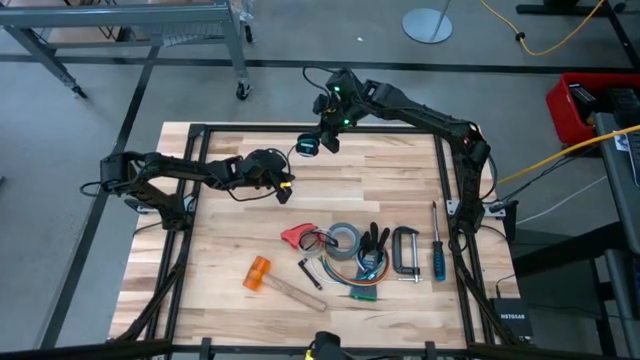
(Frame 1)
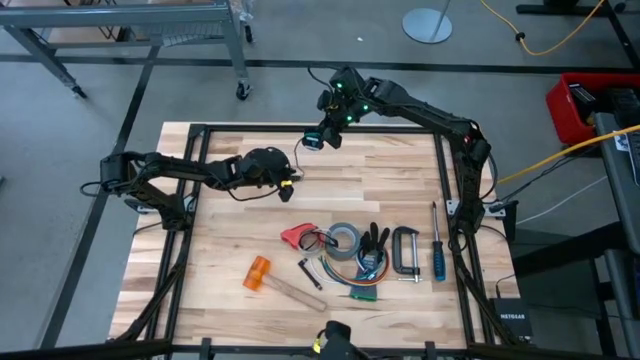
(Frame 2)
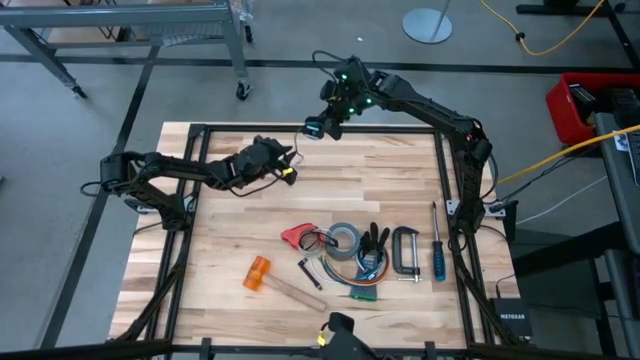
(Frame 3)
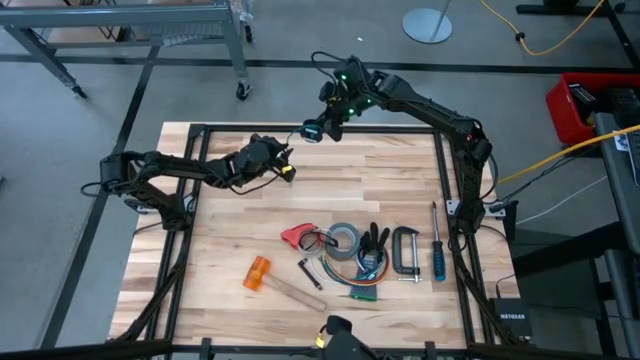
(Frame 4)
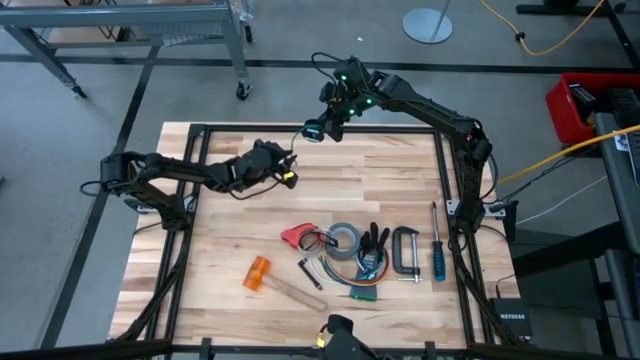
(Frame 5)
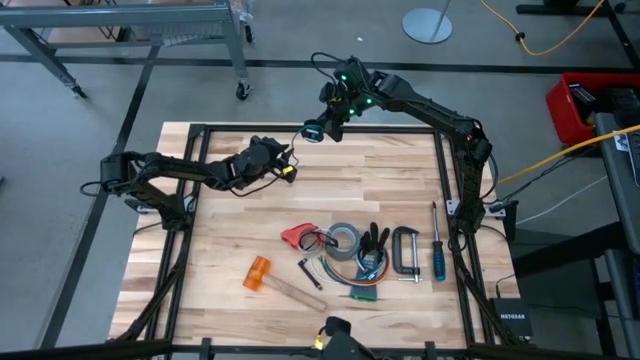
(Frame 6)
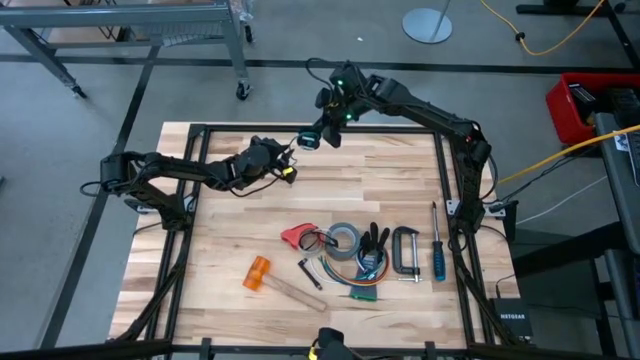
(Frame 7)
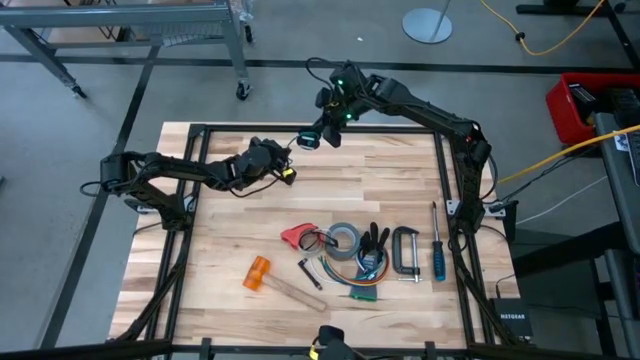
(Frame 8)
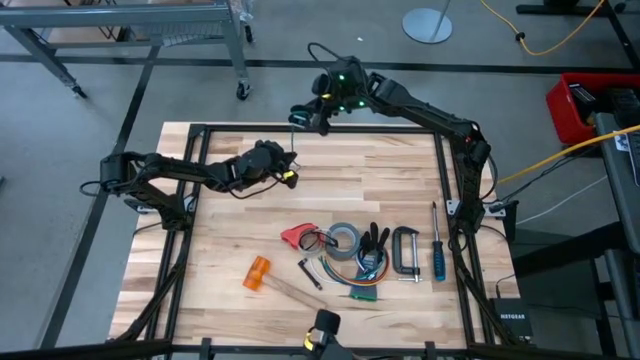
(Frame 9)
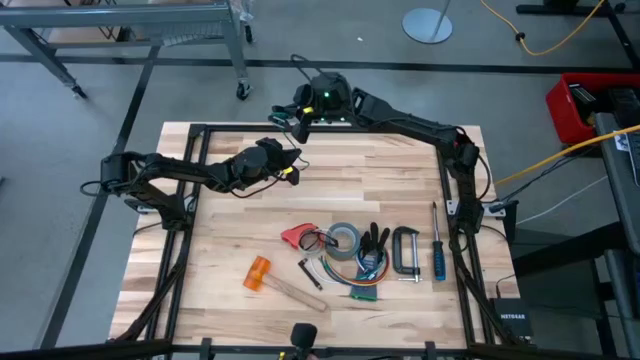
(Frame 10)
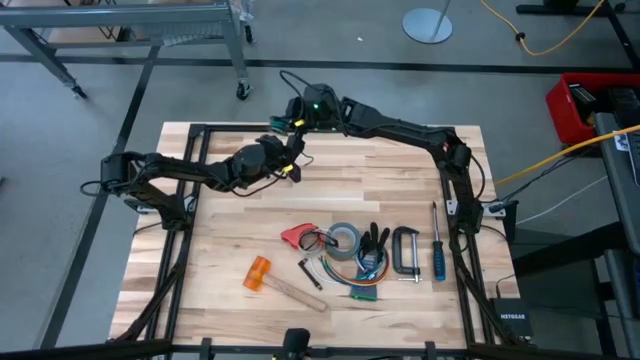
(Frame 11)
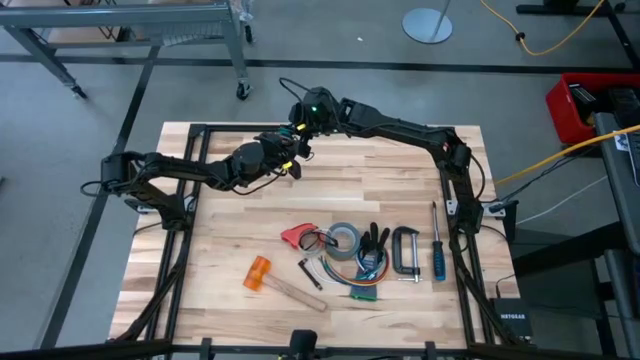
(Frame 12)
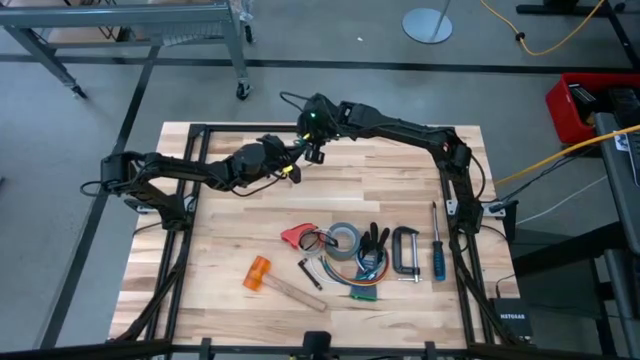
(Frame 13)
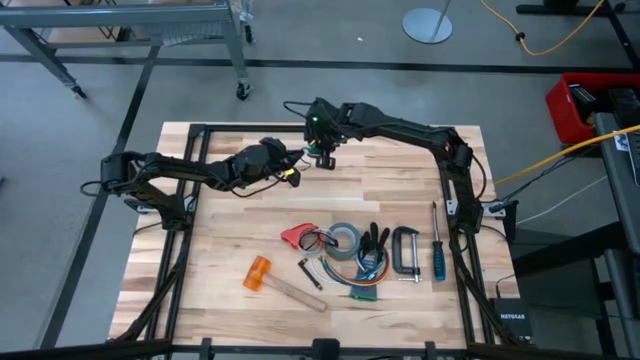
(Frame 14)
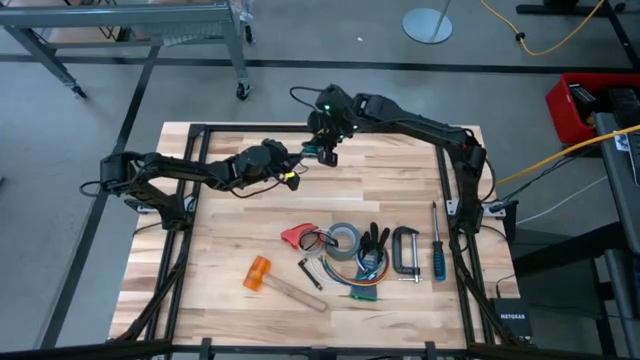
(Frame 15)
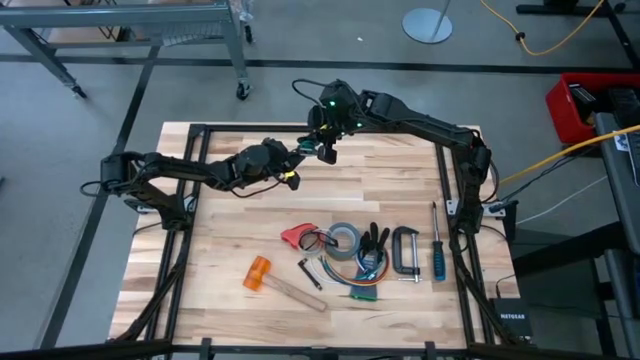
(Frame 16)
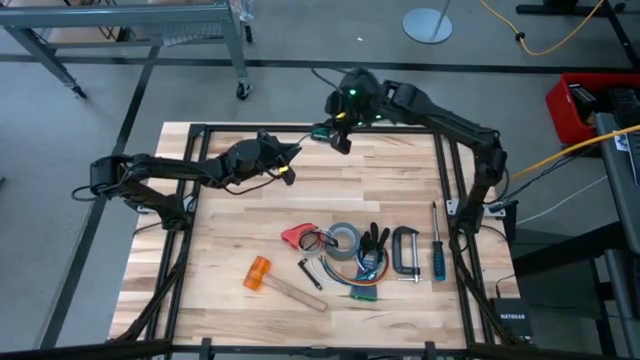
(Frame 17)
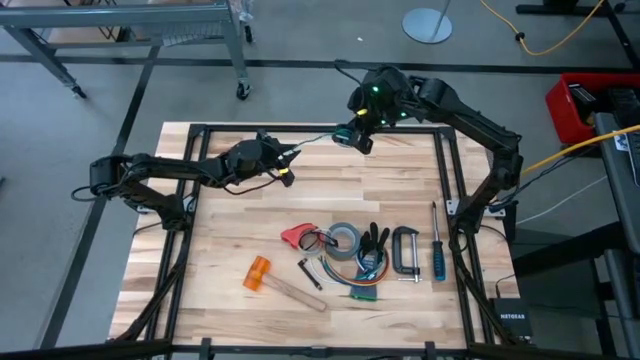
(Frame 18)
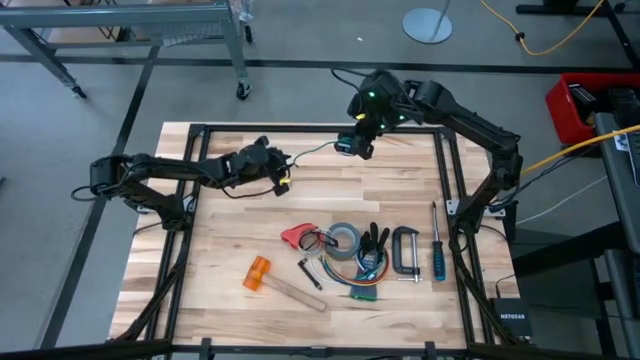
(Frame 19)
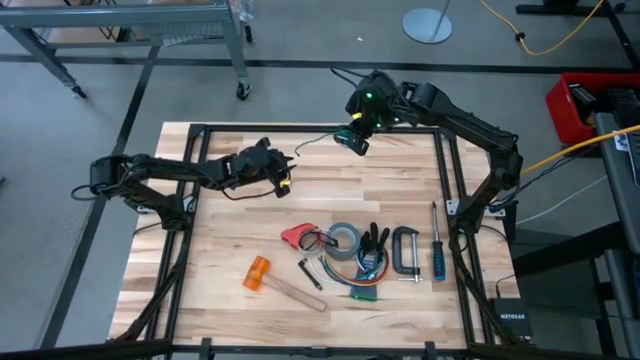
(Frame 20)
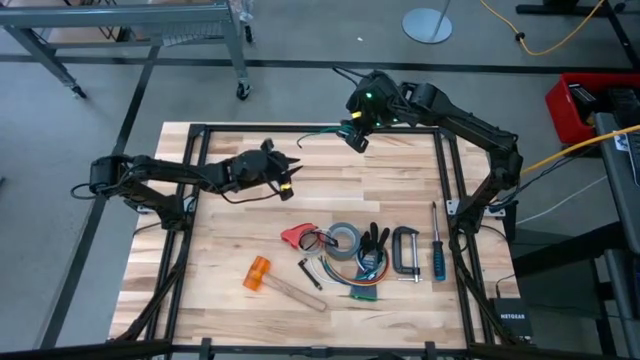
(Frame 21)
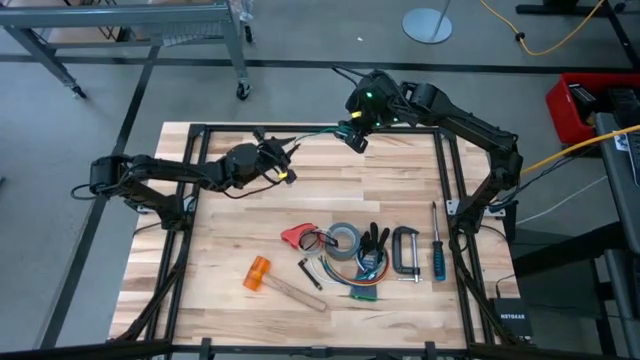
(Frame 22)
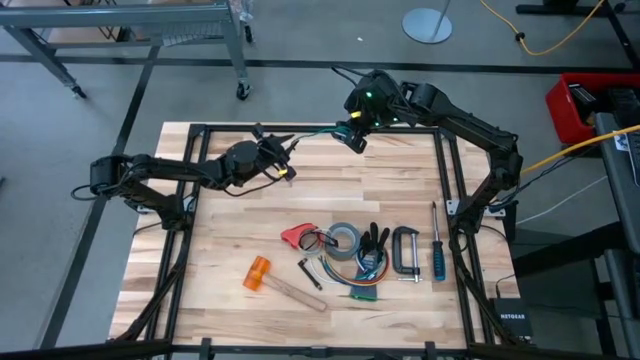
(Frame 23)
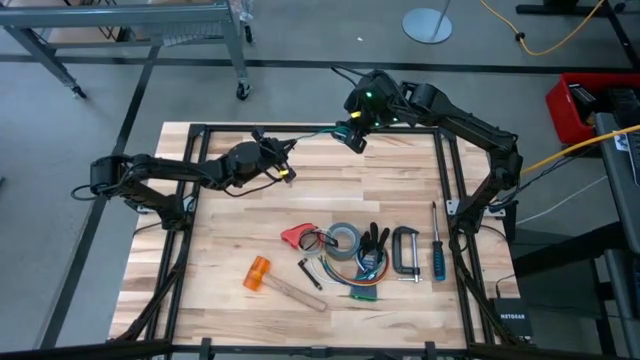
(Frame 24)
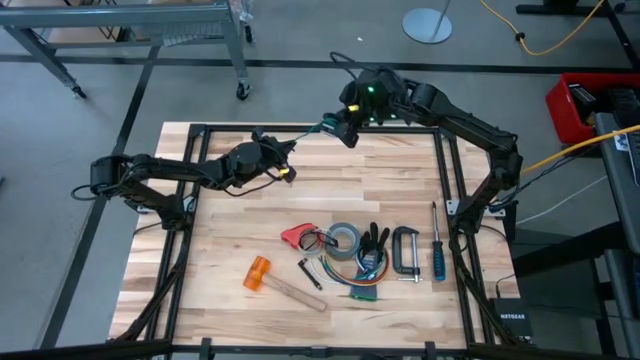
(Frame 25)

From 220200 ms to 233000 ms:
Task: Coil cords
Coil the green cable wire on the black spool

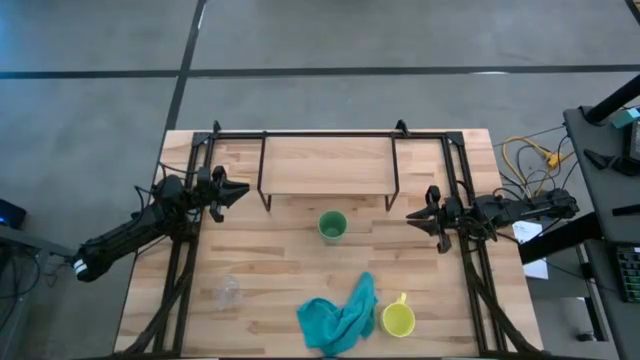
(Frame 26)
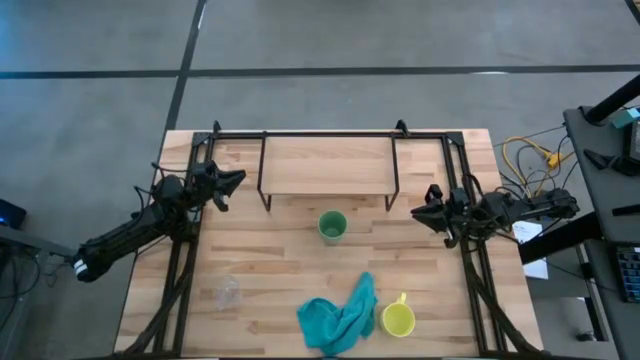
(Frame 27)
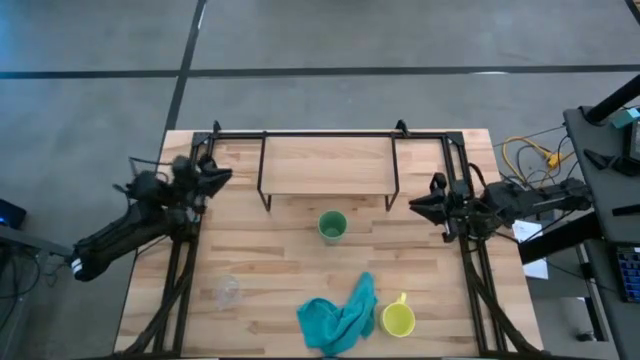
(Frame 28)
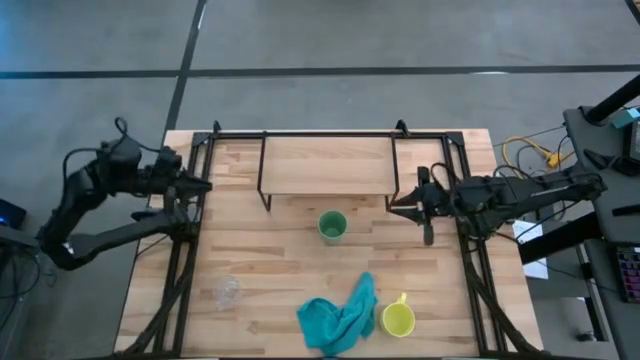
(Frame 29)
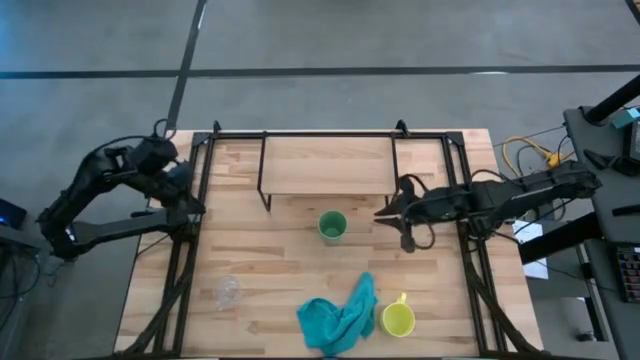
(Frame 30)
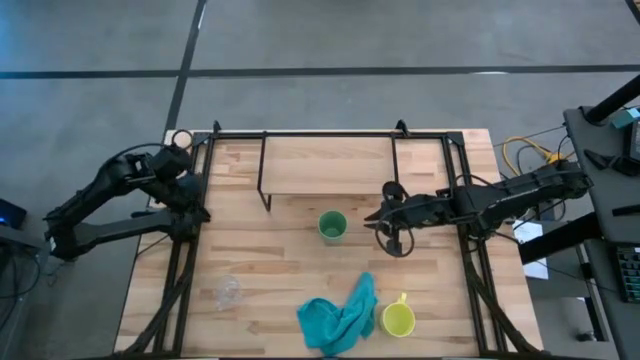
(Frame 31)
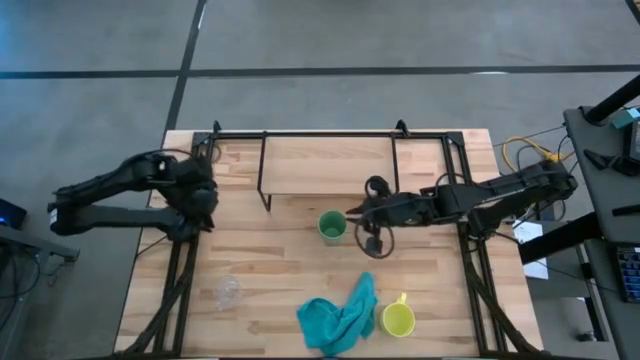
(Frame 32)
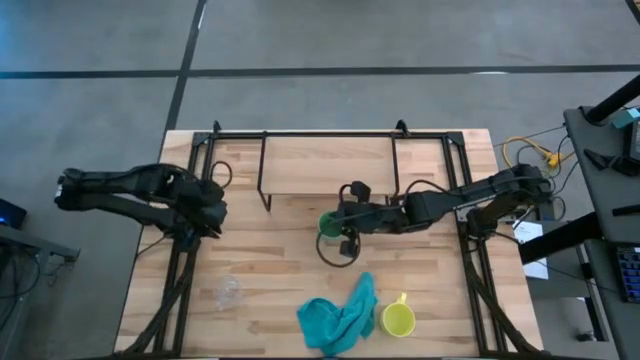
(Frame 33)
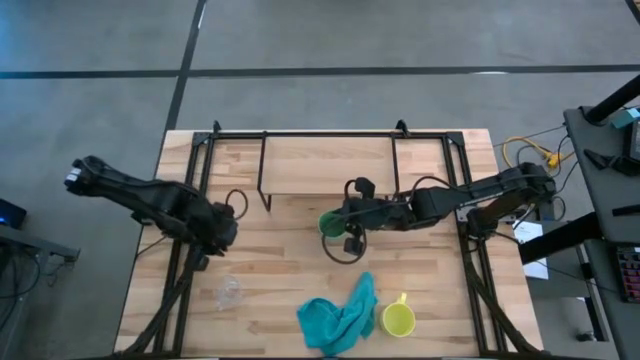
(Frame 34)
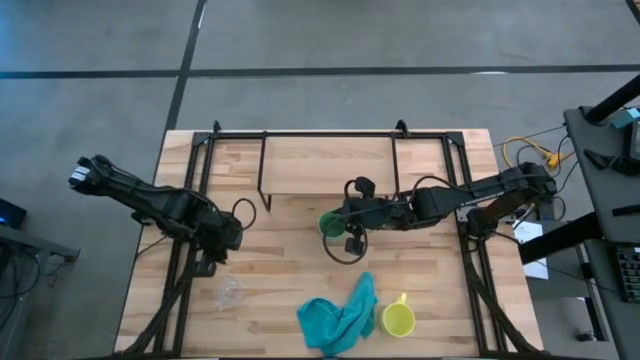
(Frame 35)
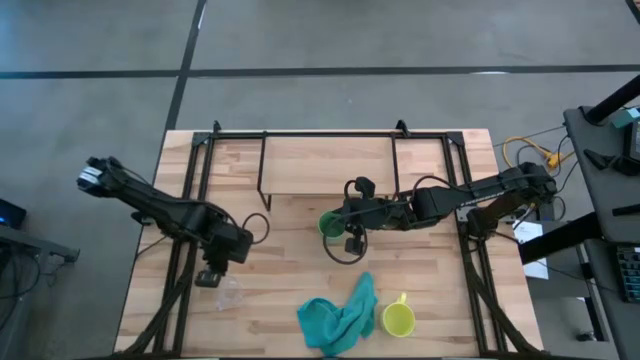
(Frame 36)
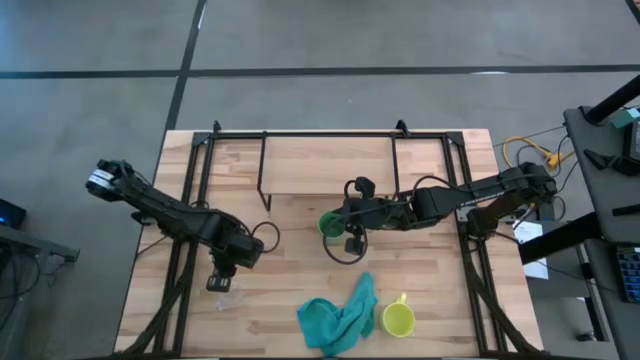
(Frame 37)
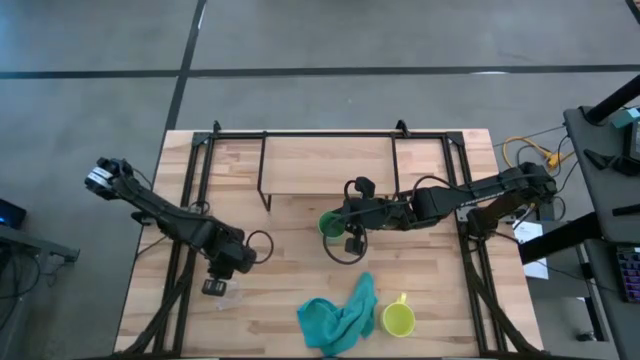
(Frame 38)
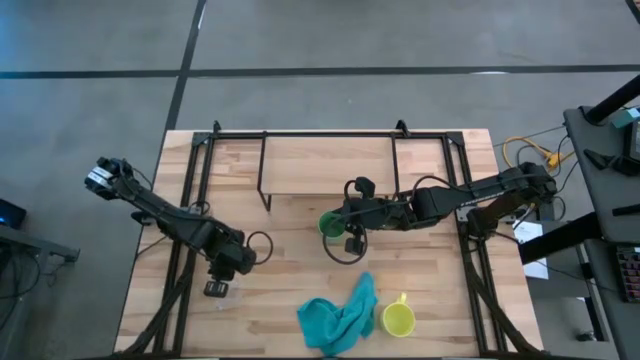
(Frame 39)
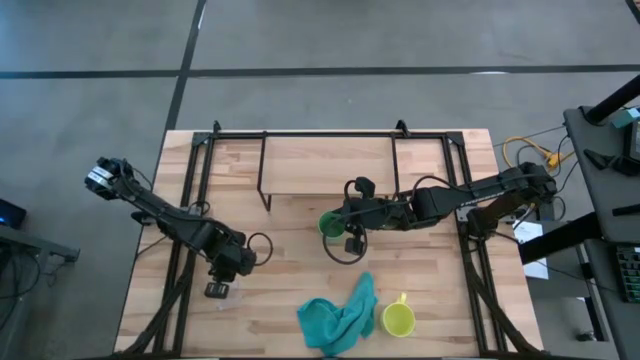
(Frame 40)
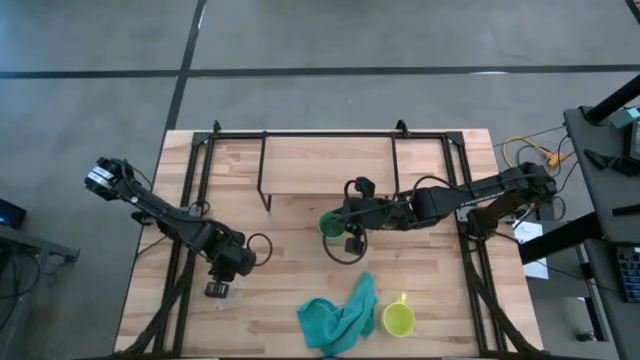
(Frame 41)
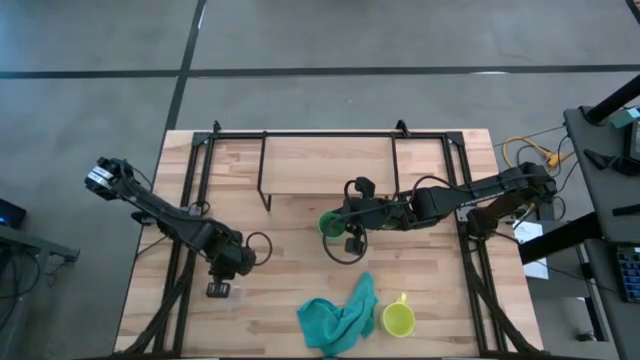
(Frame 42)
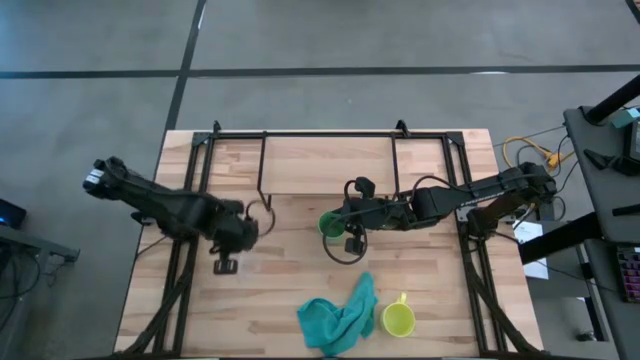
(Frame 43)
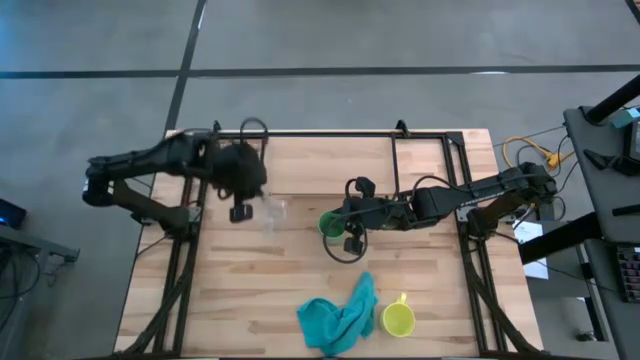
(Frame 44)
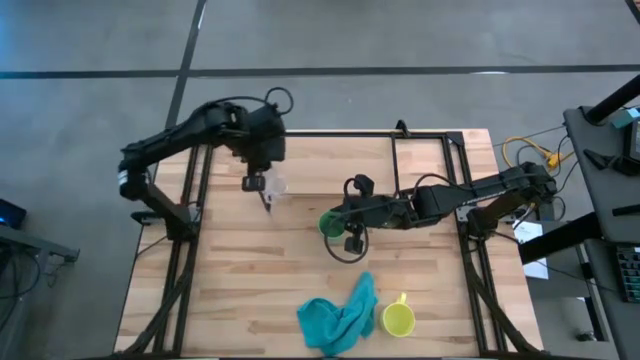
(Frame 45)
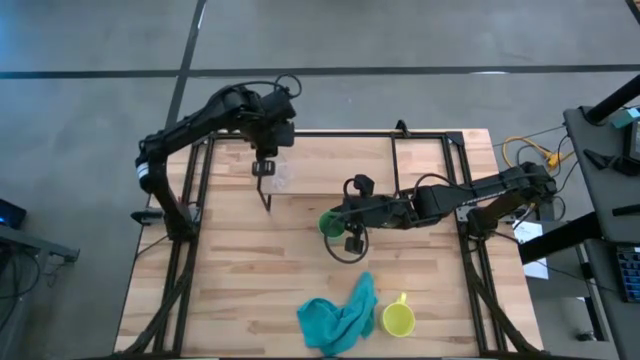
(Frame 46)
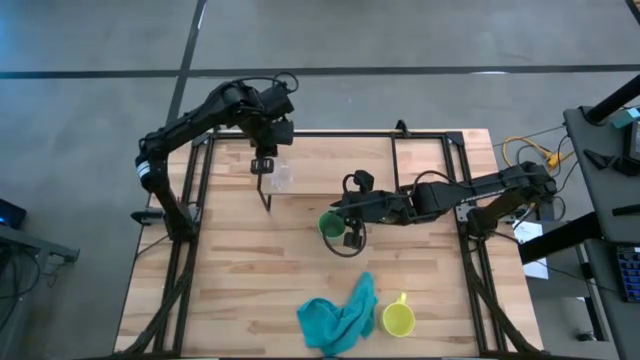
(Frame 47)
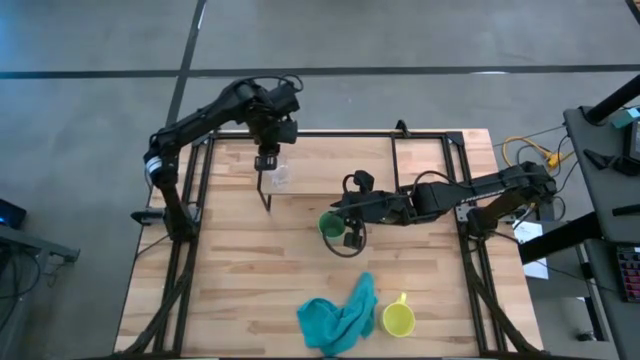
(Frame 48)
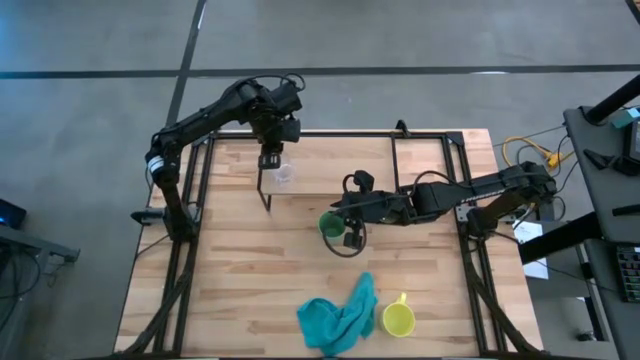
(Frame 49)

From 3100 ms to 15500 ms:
Task: Stack small to large cups/mugs on shelf
Put the transparent cup on the shelf
